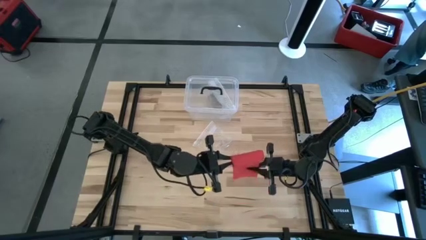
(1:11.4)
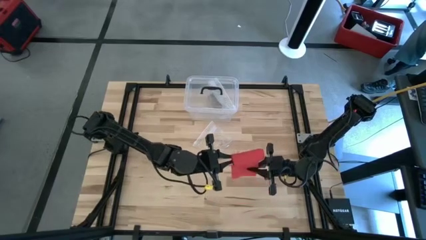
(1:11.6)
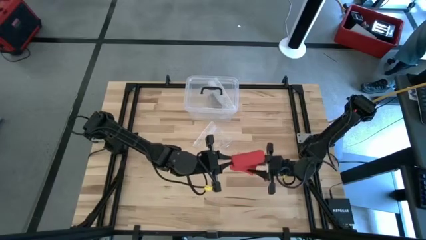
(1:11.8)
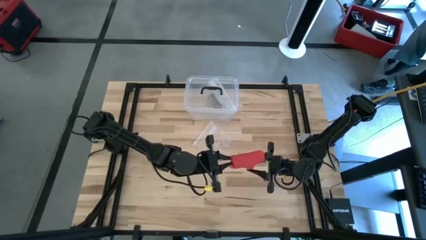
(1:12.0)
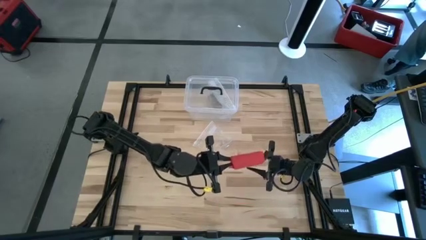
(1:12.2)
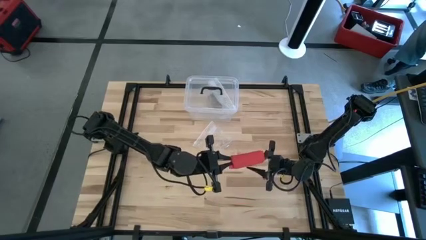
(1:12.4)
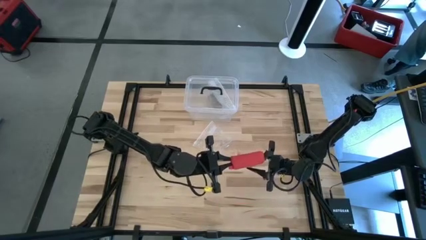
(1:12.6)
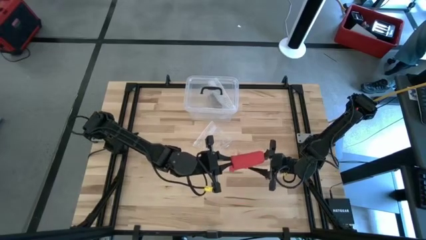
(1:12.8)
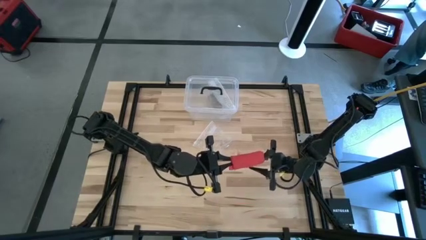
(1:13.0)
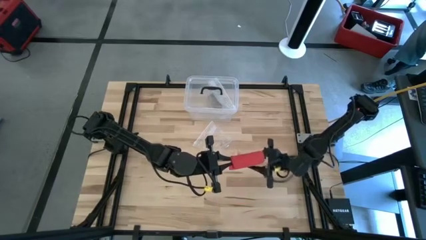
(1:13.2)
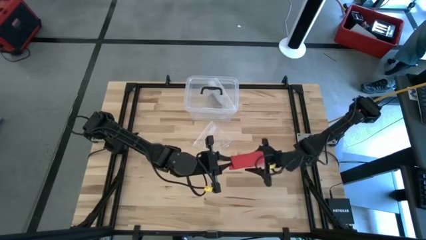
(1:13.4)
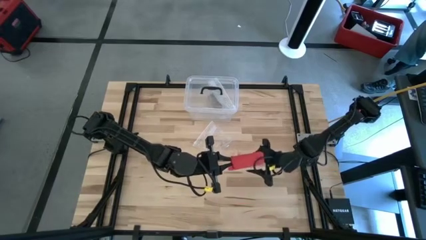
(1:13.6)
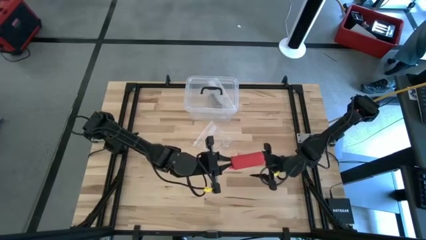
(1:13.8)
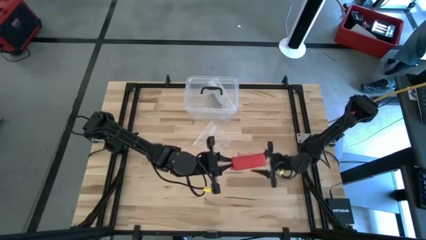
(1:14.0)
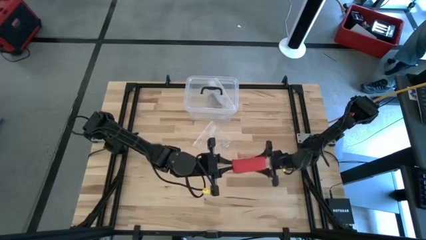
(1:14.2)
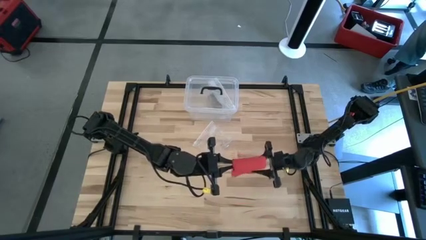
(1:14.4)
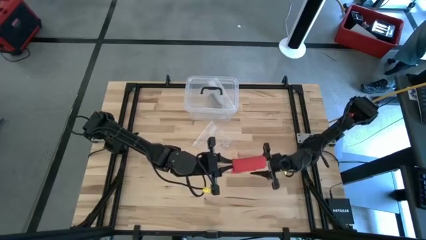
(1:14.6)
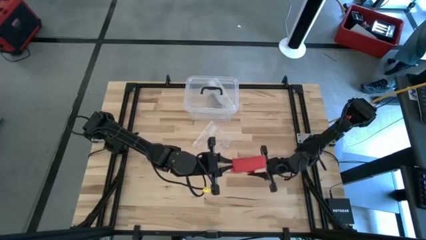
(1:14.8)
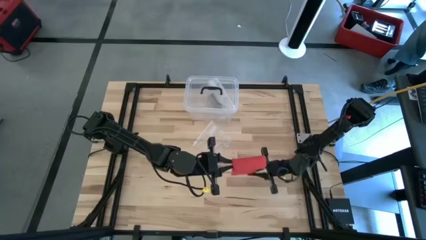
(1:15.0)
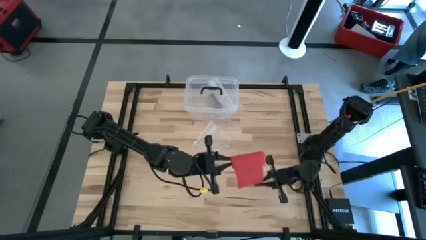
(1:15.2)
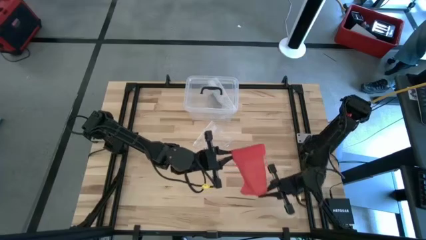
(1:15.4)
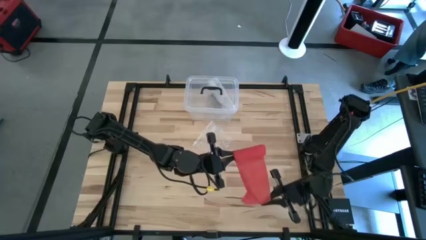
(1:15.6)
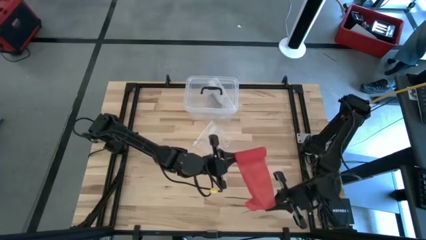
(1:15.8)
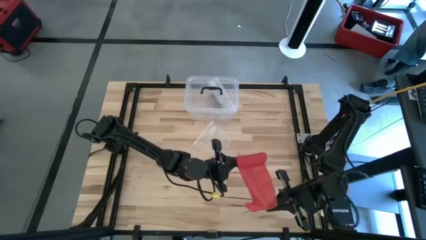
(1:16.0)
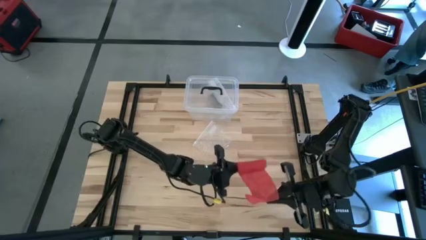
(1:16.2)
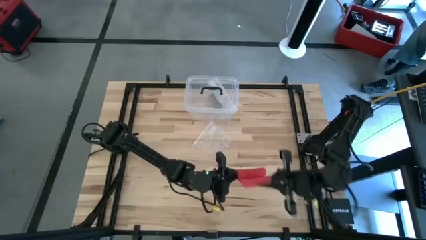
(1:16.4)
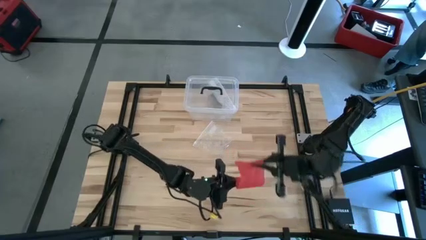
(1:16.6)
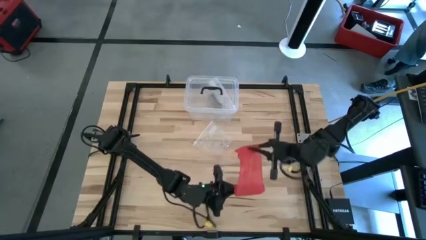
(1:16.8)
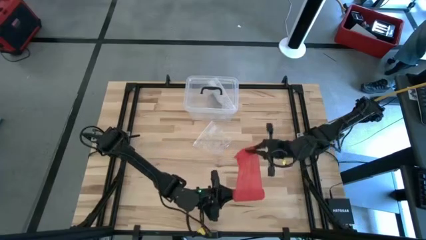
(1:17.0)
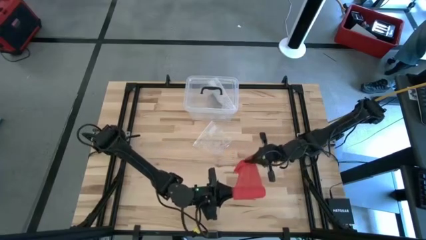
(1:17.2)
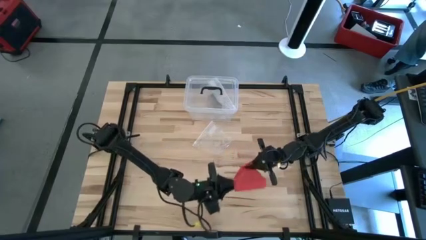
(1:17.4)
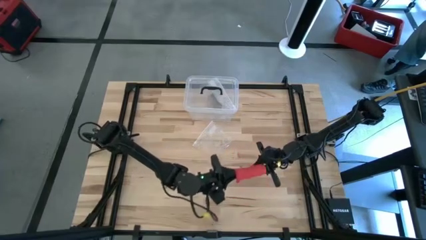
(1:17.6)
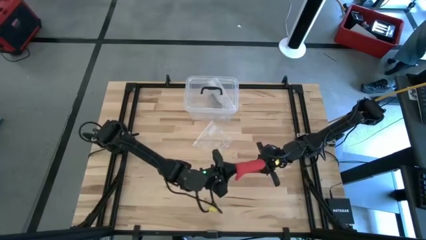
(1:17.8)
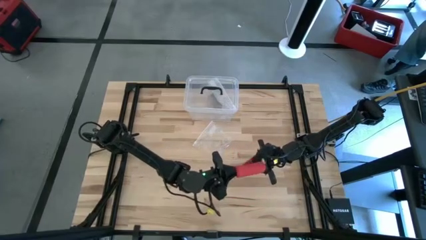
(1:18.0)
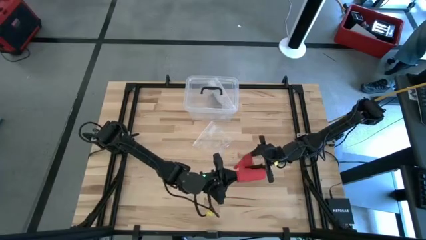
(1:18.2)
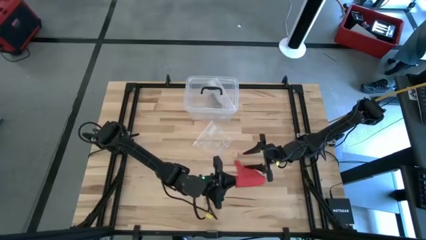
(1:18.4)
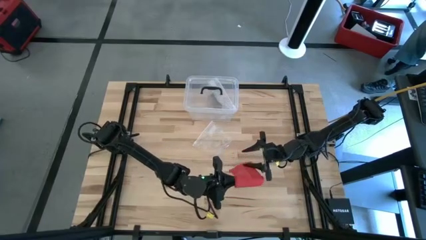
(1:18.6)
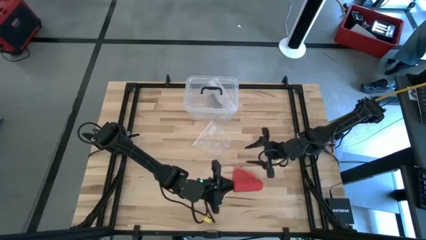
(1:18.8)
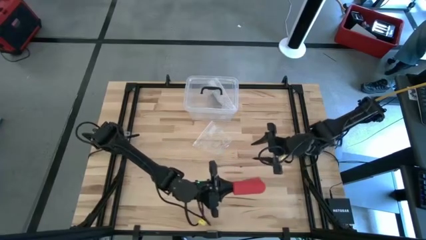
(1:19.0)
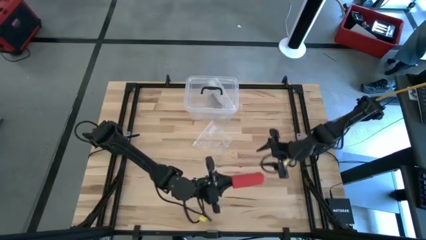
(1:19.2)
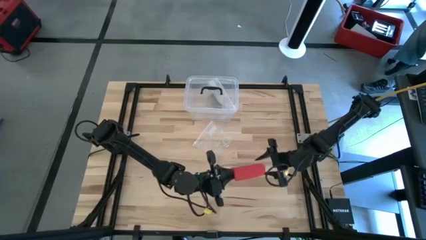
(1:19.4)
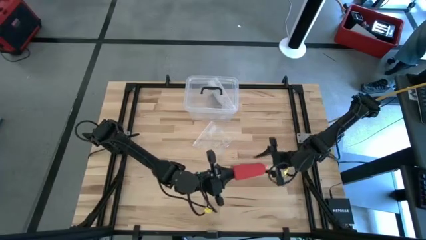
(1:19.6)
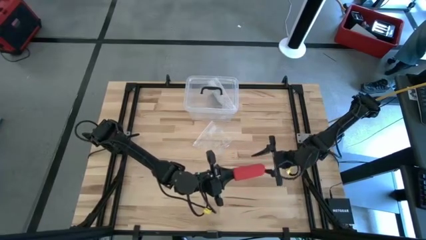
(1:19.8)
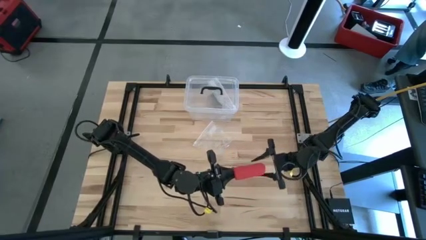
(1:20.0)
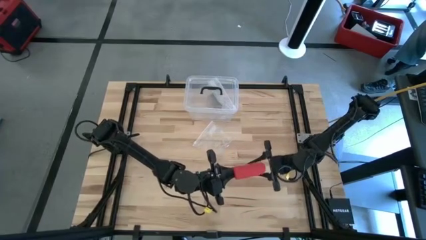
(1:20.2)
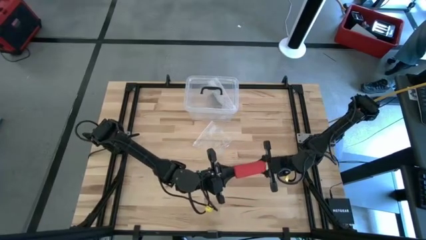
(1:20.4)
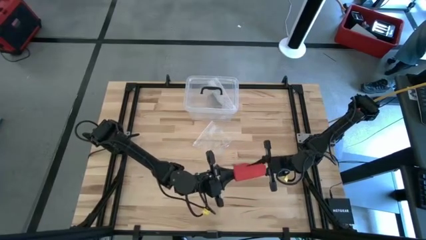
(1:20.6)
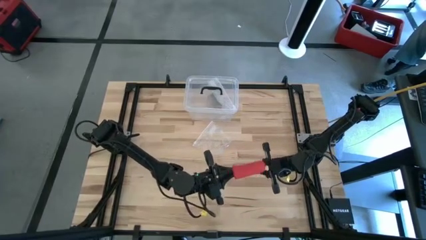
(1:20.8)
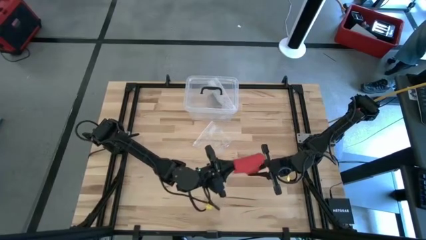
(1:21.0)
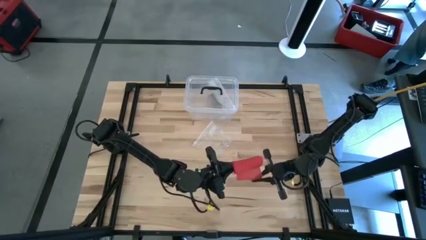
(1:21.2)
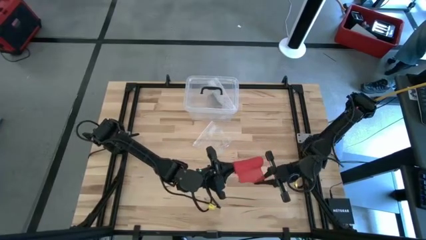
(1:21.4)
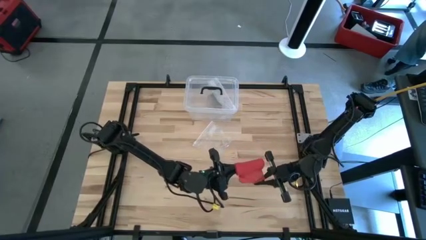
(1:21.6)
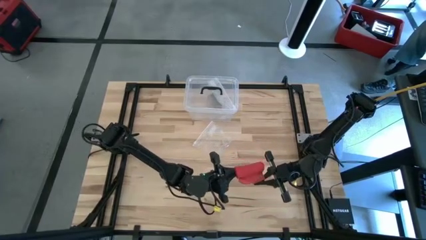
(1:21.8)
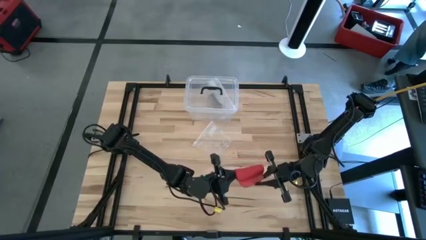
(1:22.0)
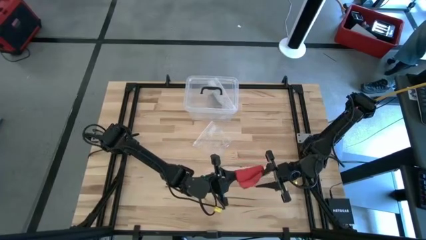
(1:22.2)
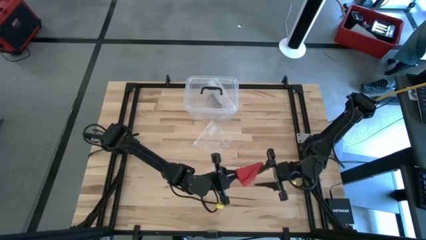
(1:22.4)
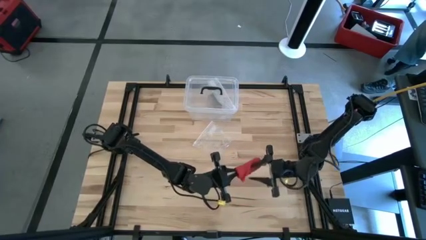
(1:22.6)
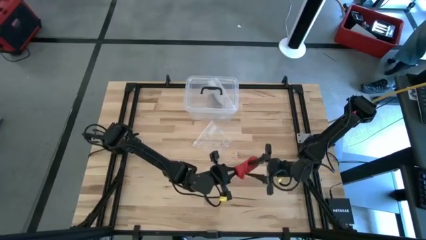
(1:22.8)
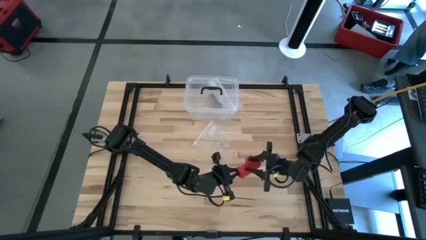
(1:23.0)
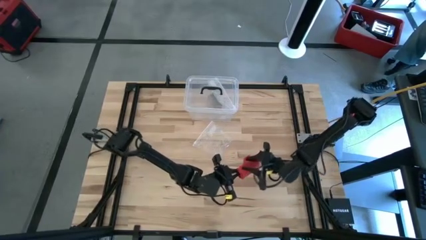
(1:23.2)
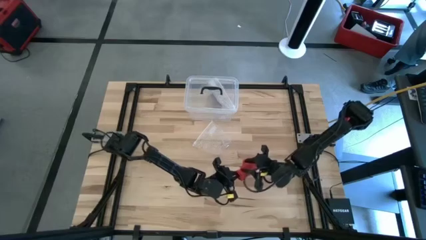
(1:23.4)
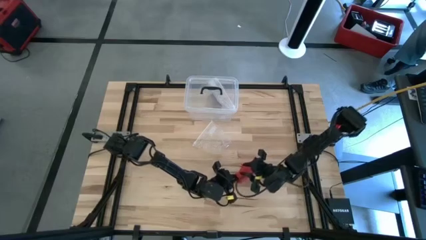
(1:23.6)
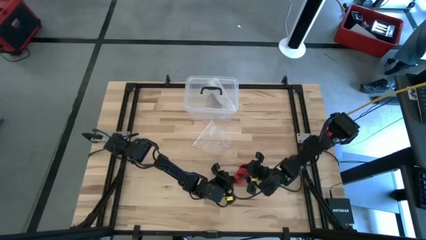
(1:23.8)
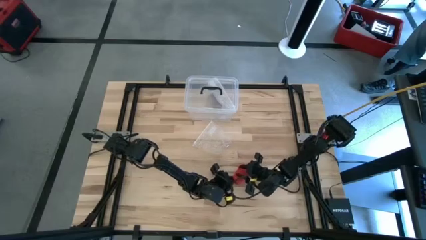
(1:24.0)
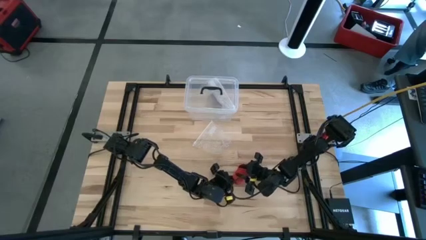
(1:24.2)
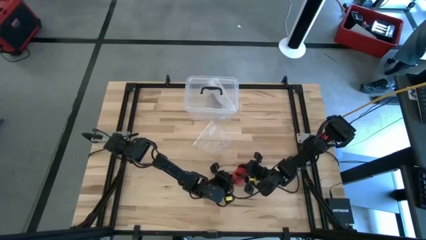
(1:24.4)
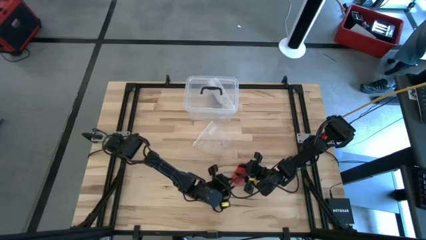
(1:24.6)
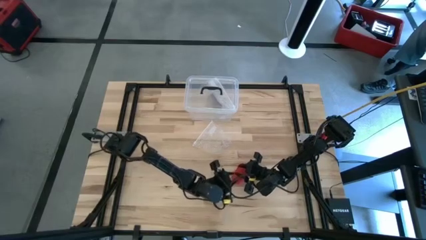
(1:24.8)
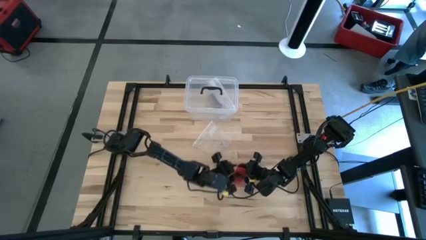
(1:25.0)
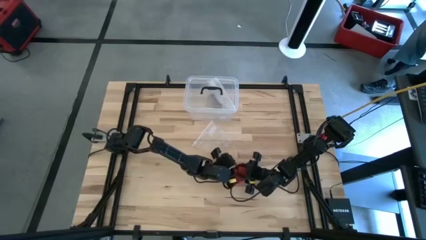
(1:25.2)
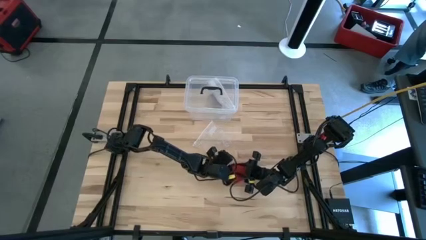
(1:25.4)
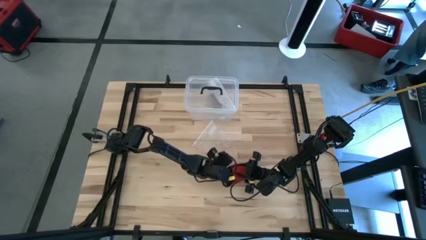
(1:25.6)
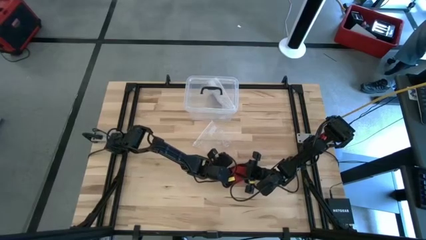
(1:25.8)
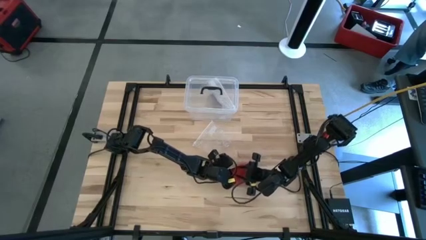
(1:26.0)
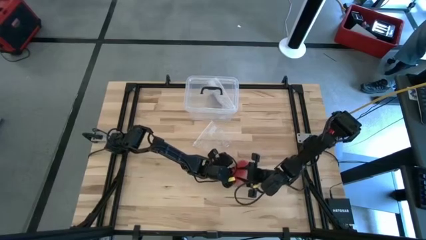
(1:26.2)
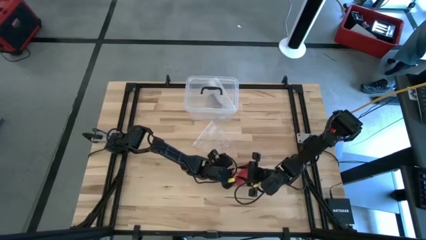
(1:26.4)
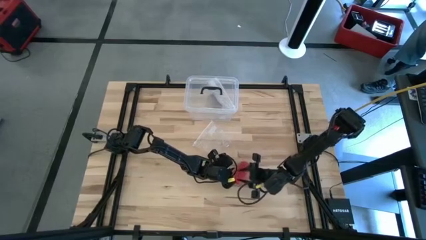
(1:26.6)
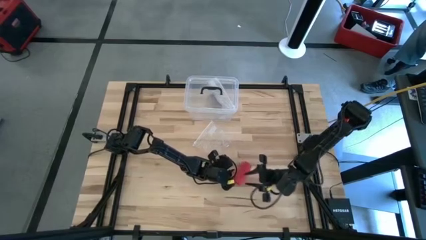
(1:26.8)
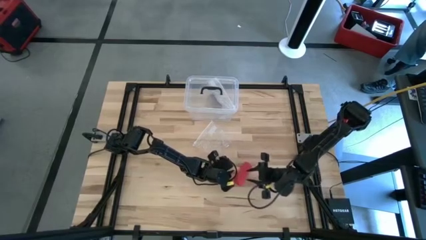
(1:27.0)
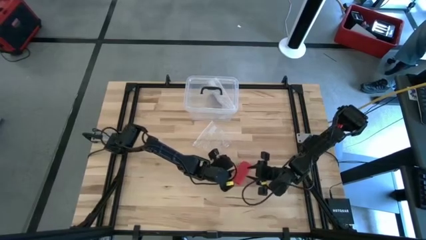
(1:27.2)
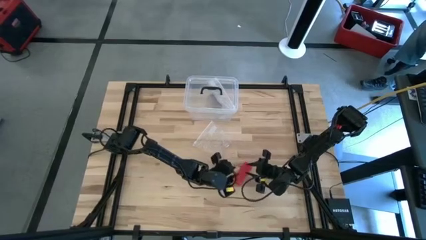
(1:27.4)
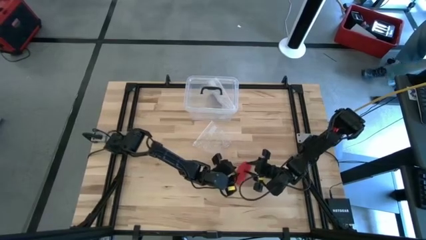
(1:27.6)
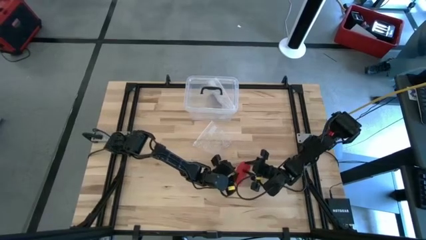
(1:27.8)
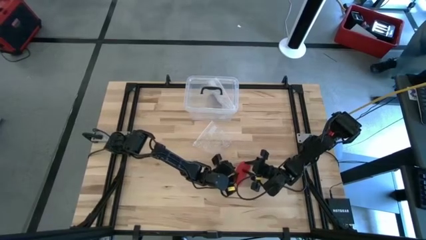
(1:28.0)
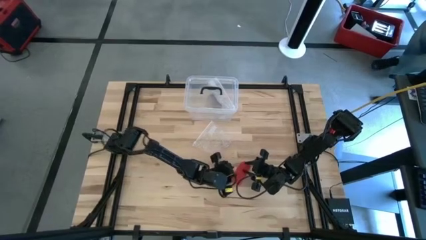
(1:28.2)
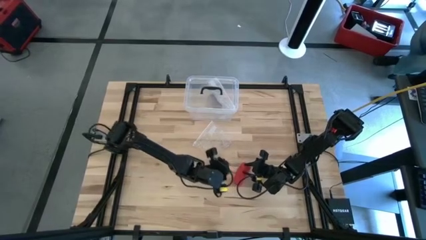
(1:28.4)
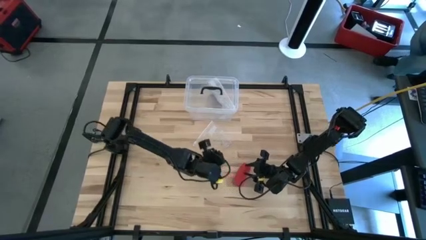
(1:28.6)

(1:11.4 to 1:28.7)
Task: Roll bandage
Roll the red bandage
